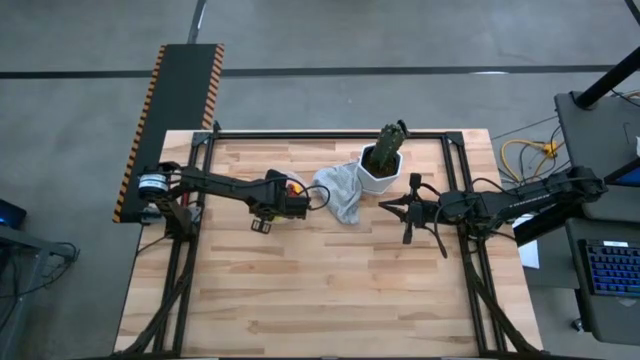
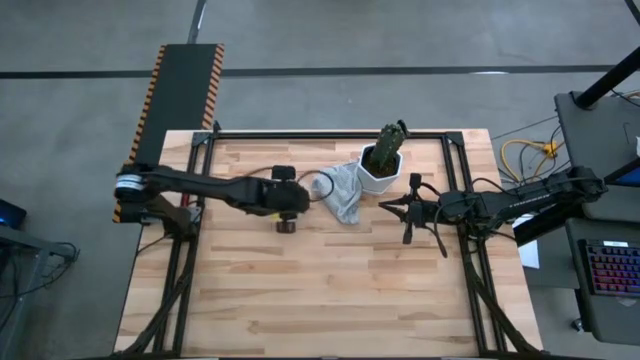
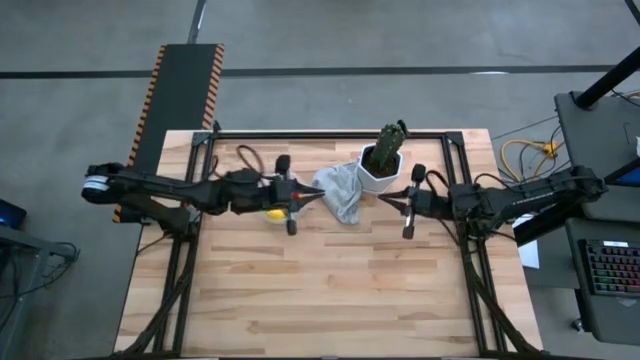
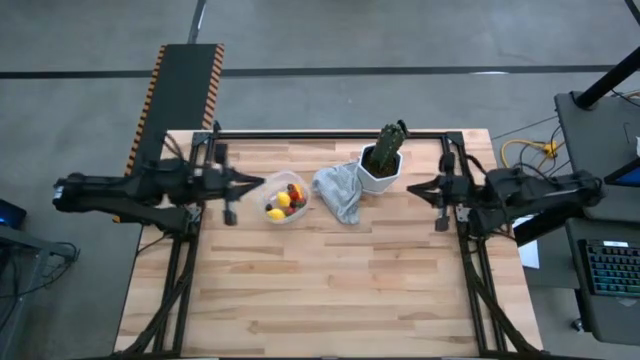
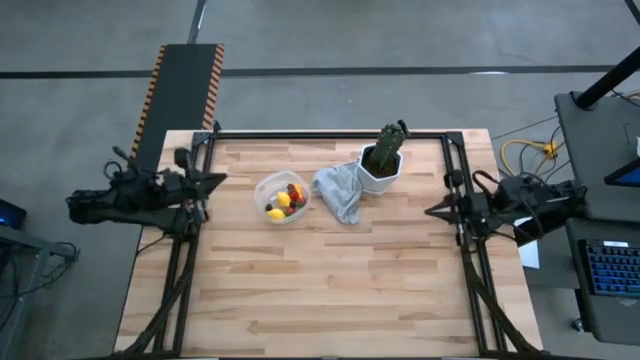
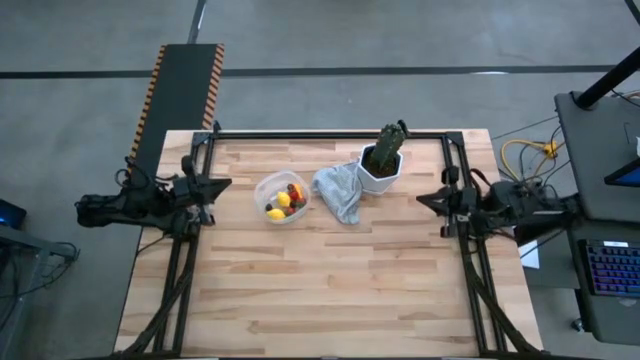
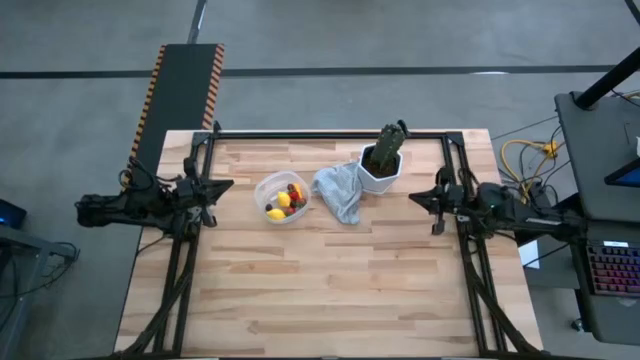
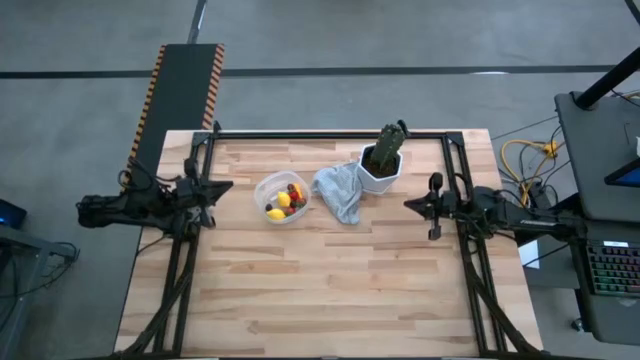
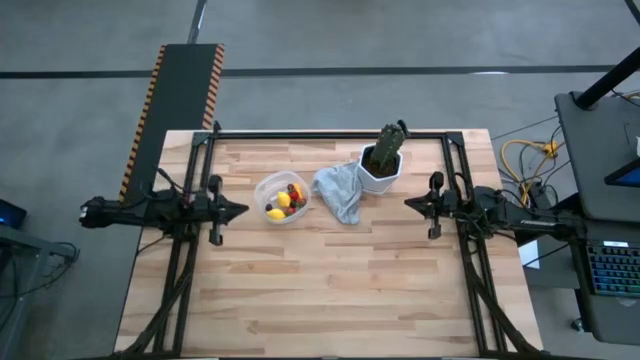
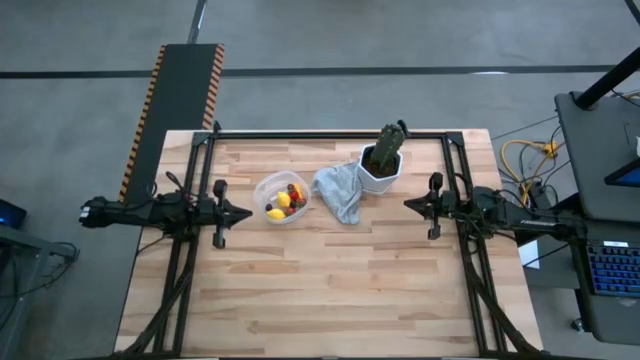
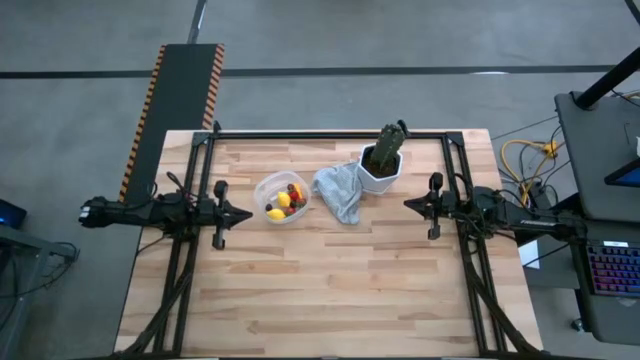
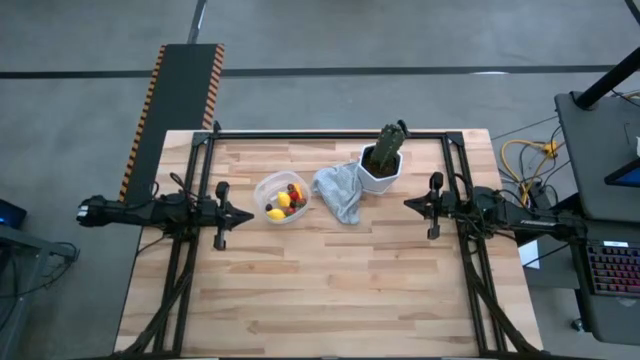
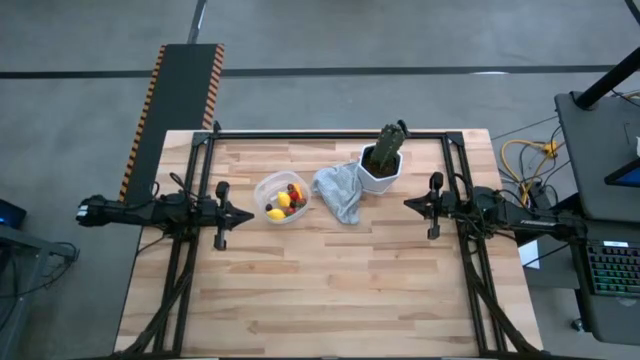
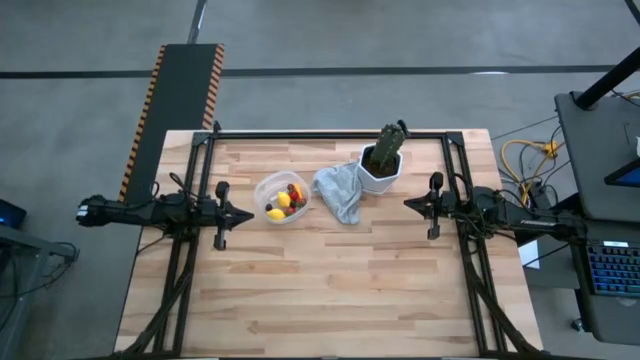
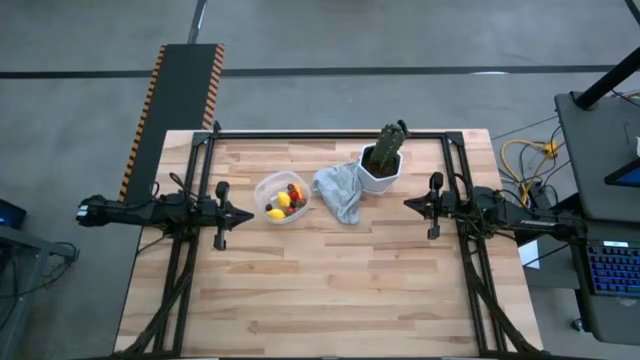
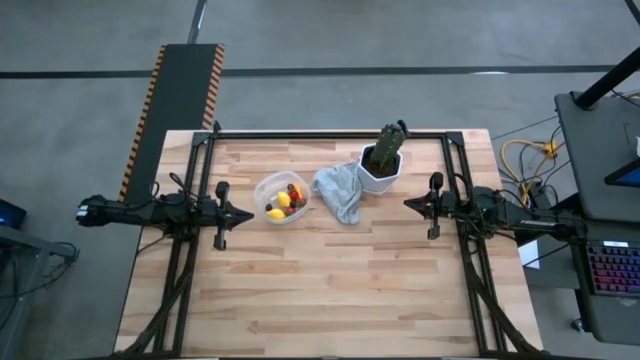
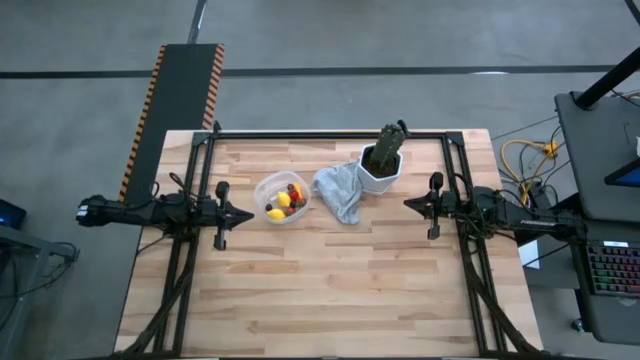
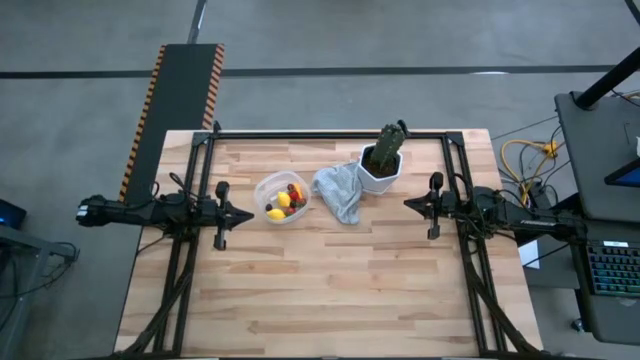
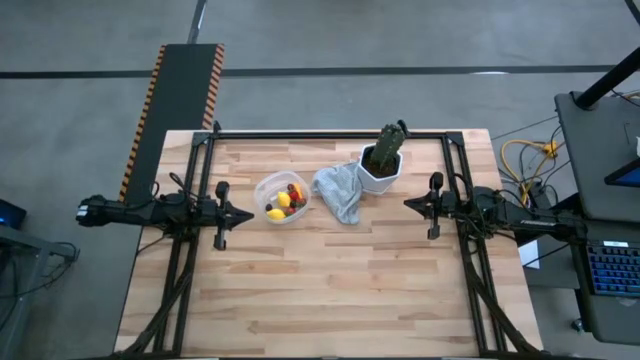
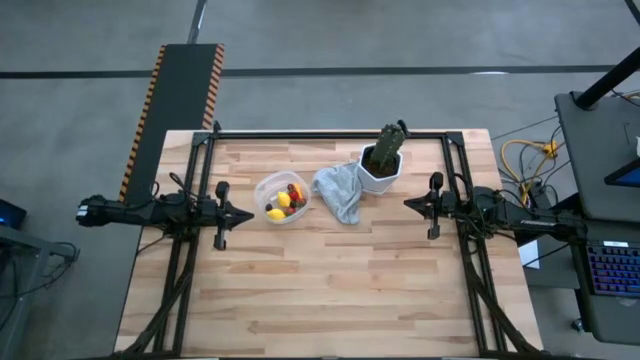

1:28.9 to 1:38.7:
Task: Pick and placing Produce into tupperware
Return to Home Position

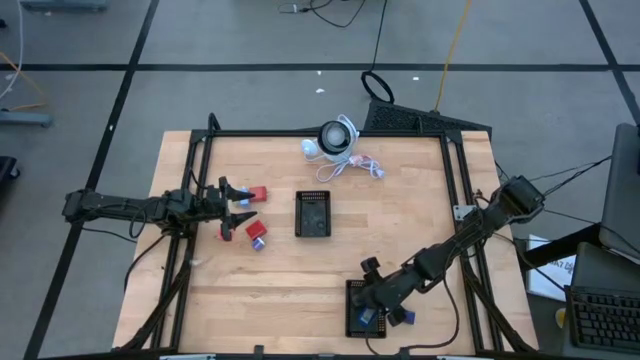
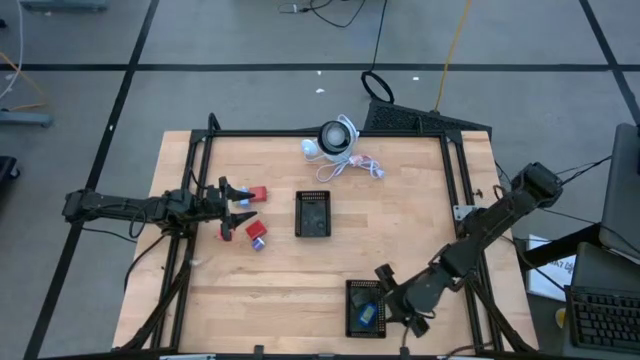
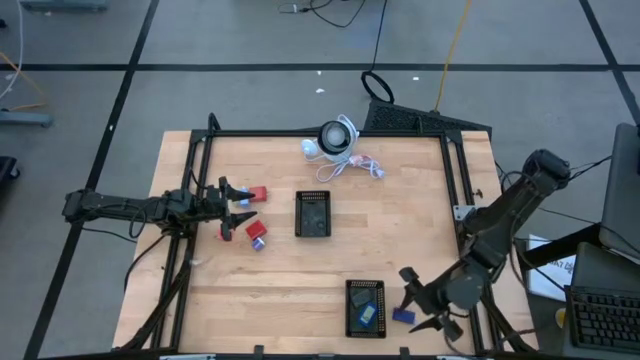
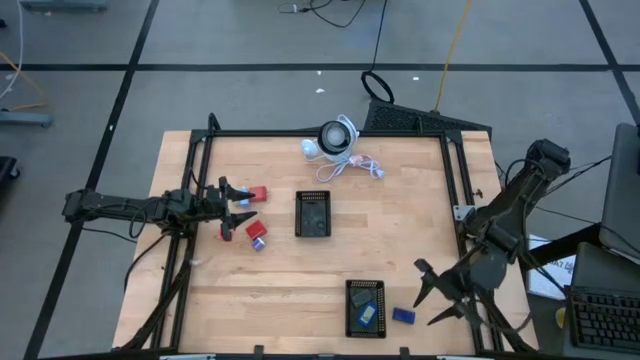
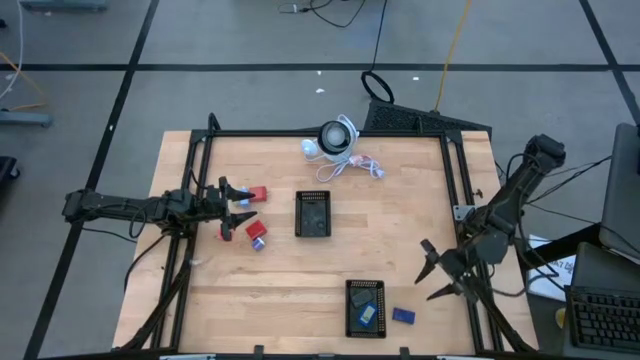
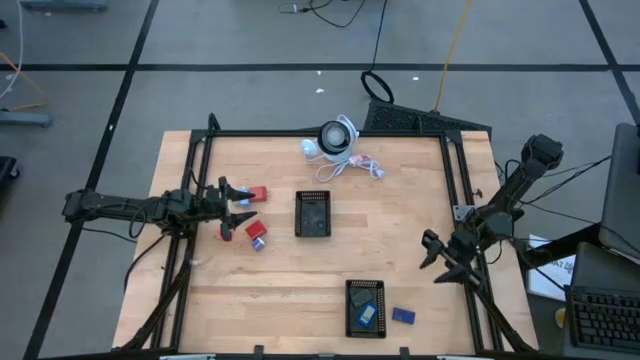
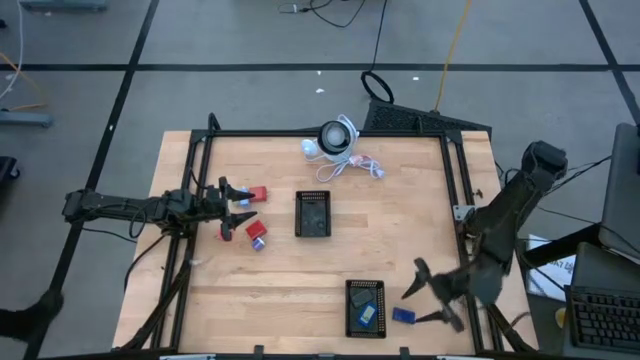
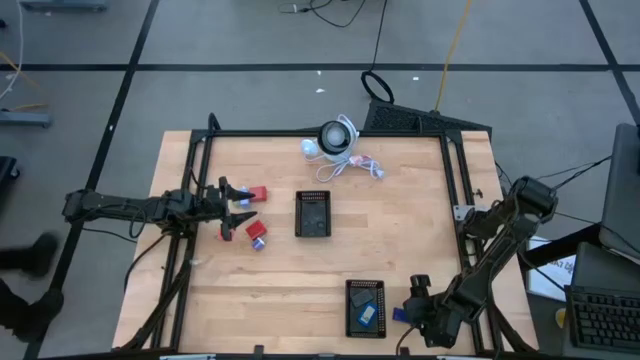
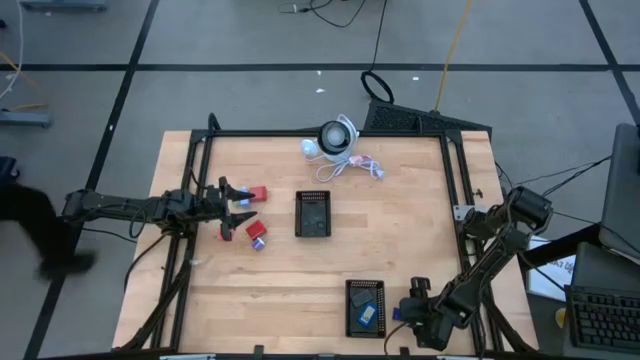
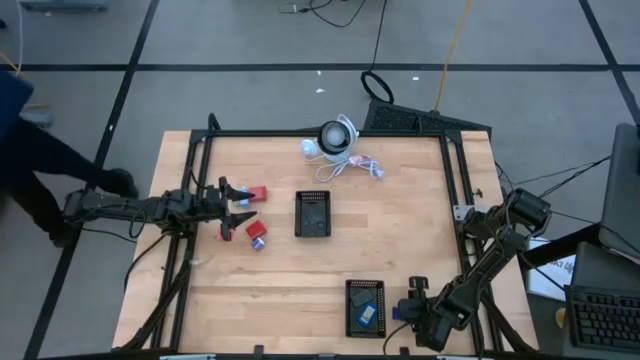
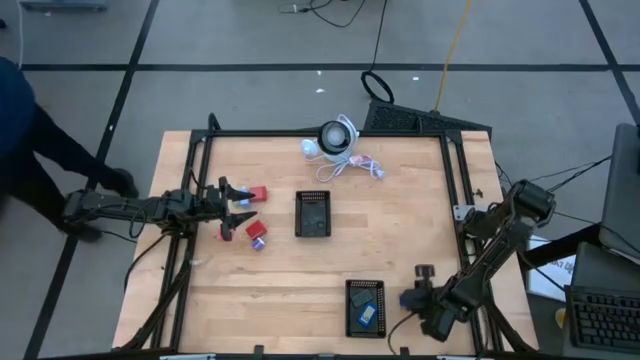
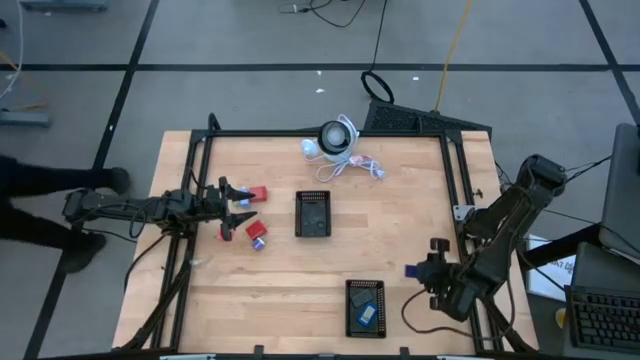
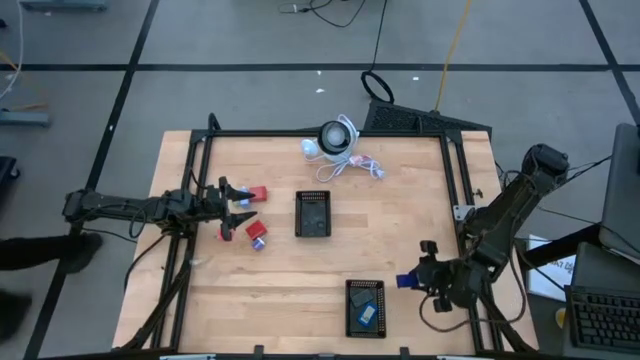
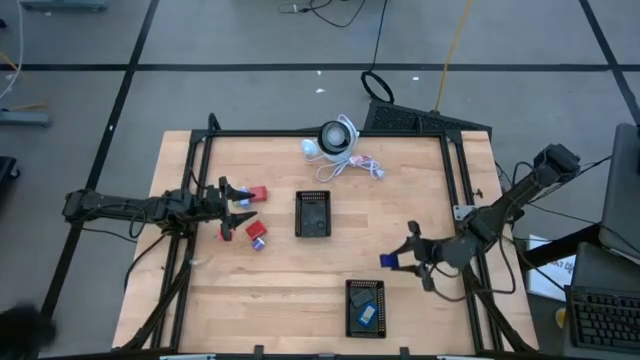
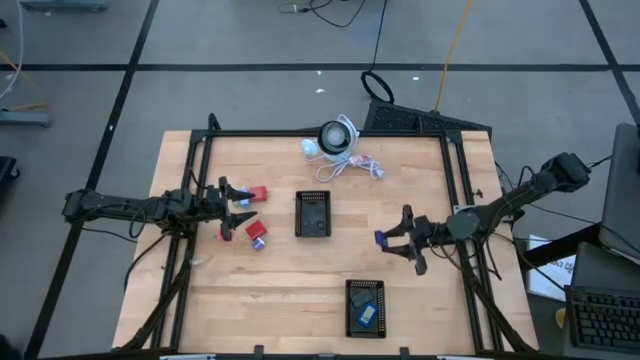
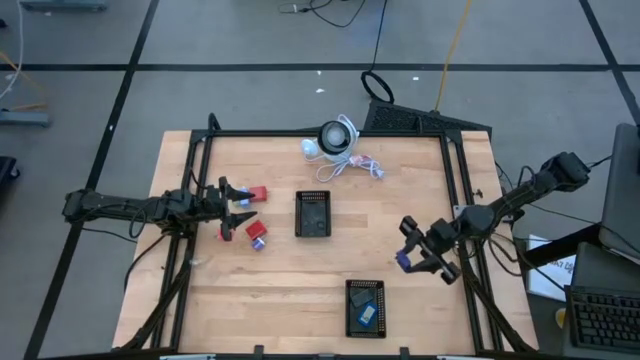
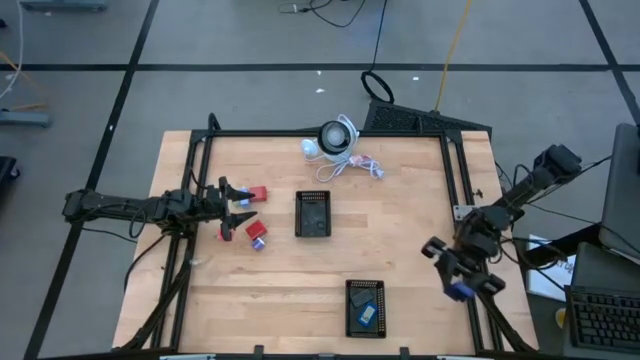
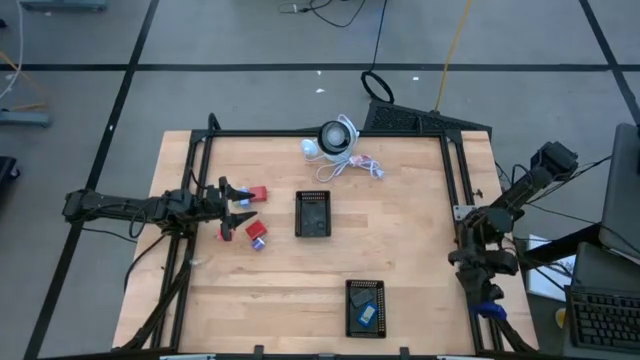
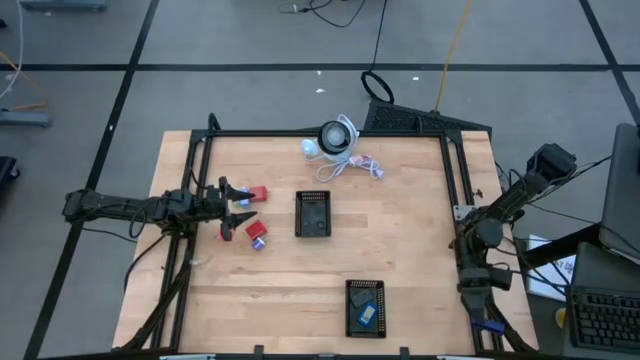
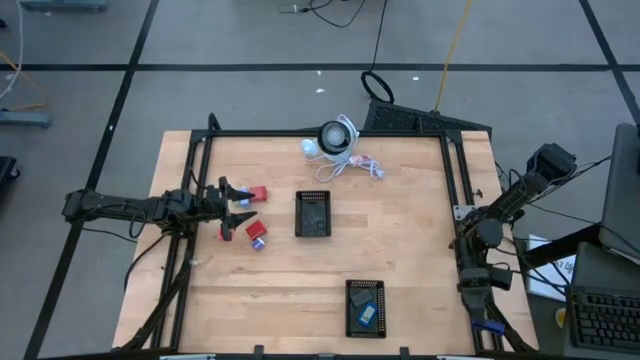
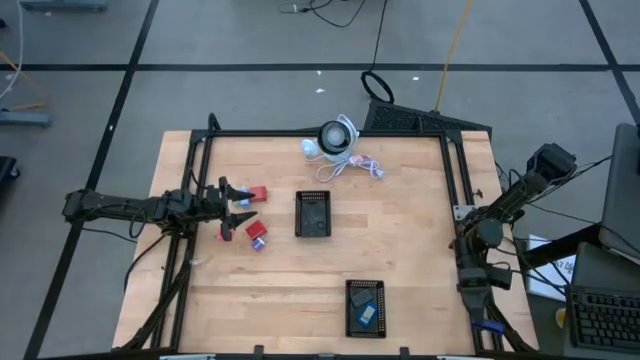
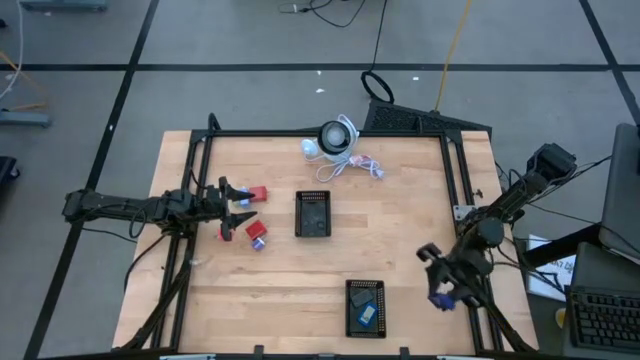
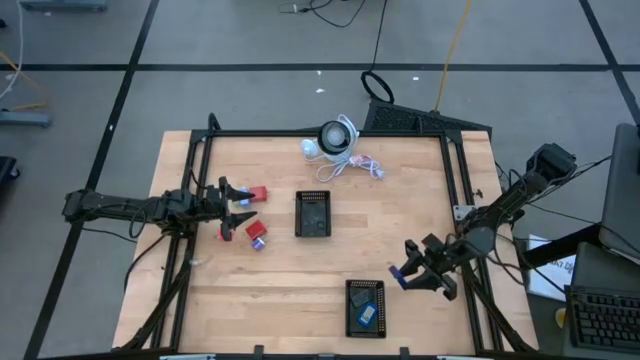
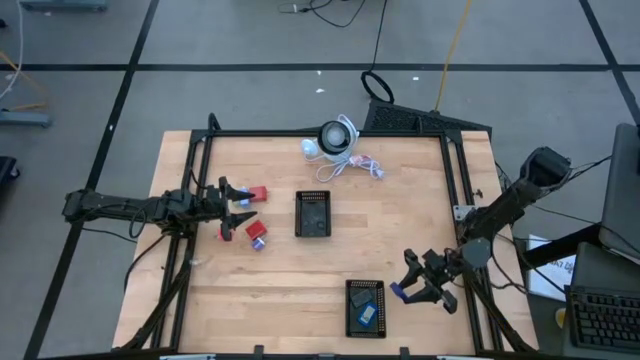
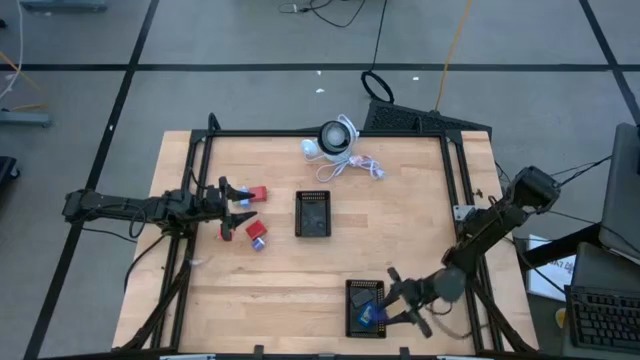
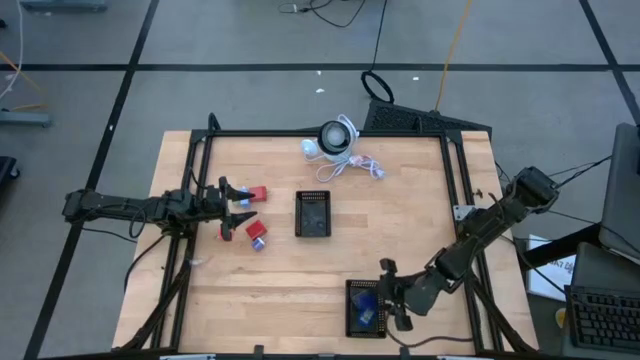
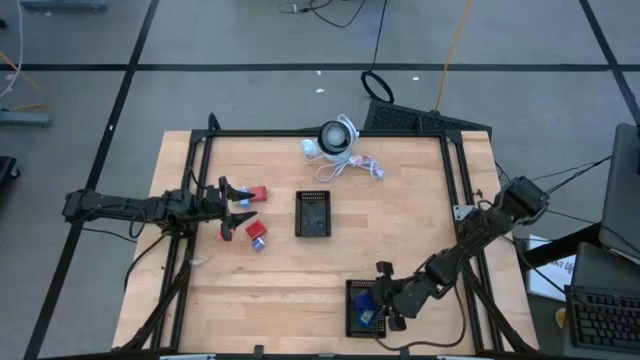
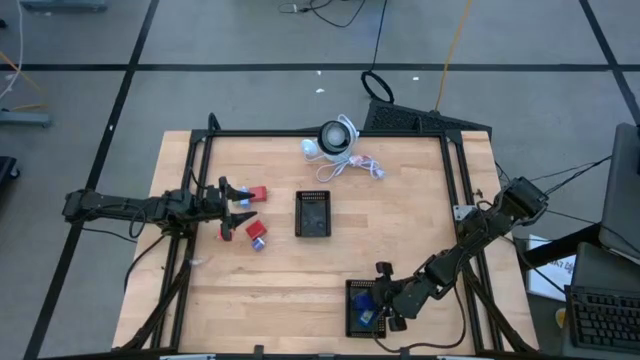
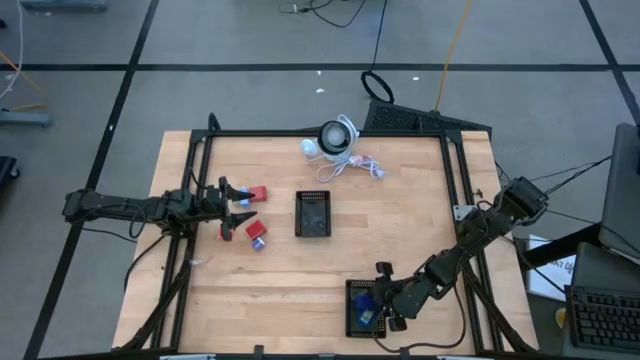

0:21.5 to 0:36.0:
Task: Pick & Place Office items
Put the dark blue digital timer into the bottom black basket
